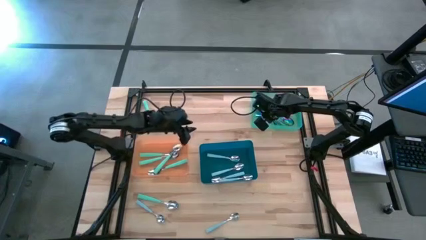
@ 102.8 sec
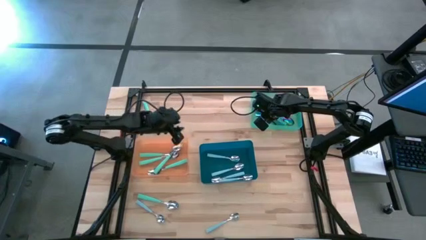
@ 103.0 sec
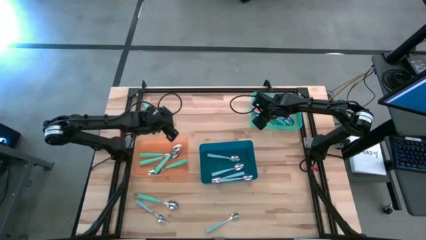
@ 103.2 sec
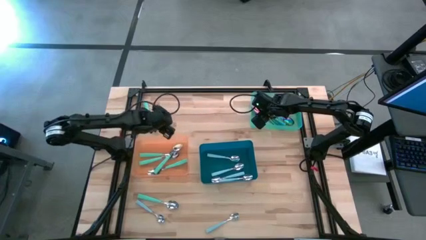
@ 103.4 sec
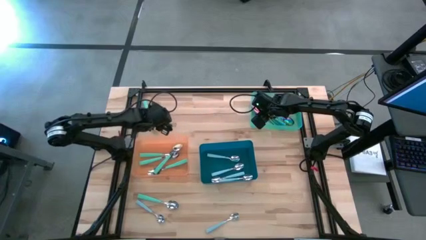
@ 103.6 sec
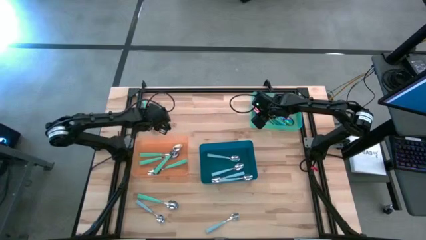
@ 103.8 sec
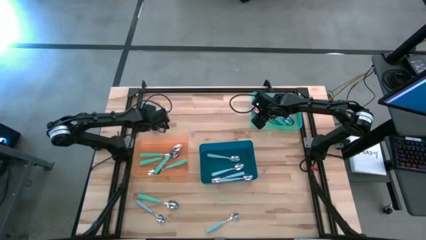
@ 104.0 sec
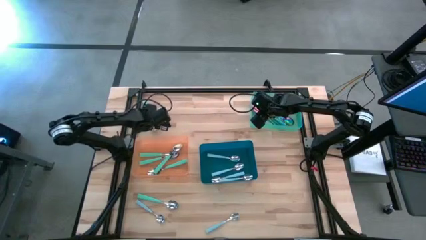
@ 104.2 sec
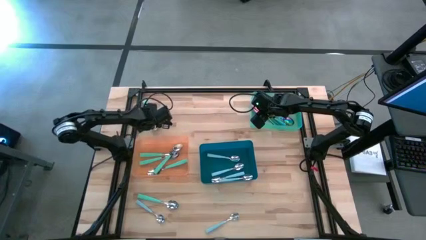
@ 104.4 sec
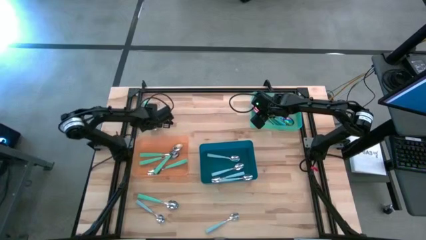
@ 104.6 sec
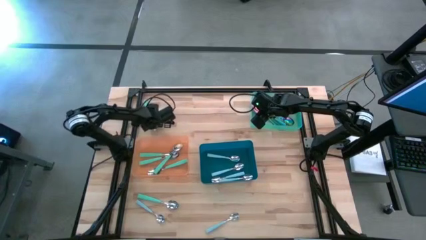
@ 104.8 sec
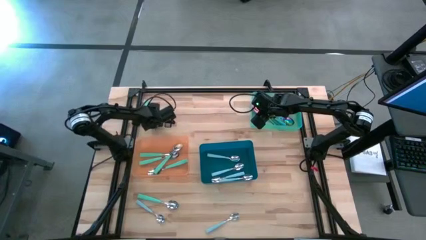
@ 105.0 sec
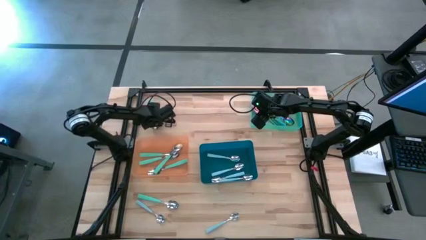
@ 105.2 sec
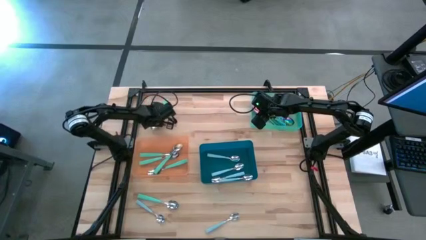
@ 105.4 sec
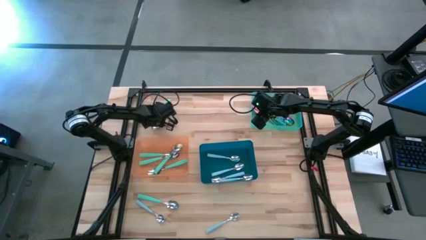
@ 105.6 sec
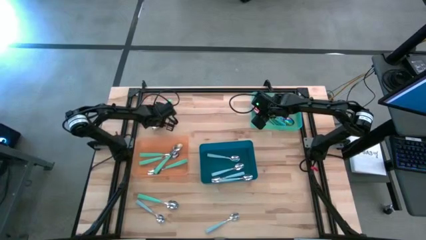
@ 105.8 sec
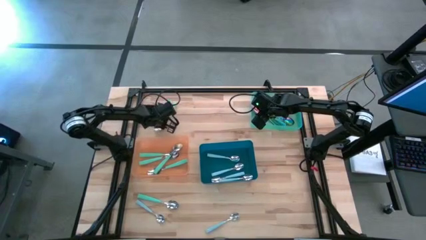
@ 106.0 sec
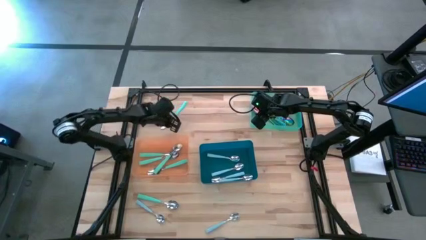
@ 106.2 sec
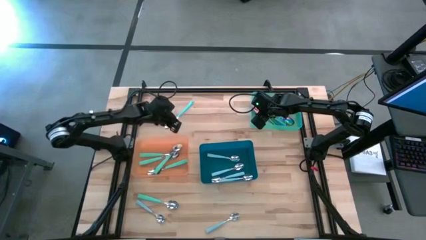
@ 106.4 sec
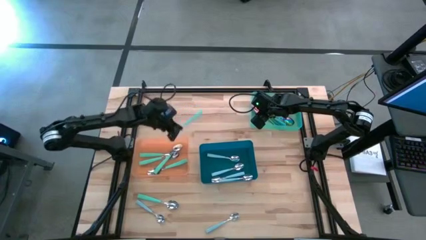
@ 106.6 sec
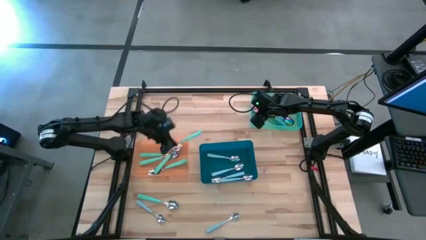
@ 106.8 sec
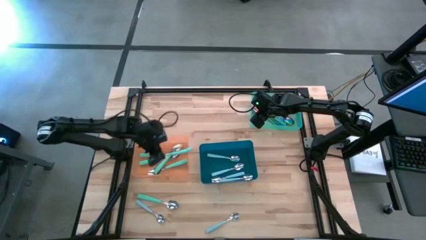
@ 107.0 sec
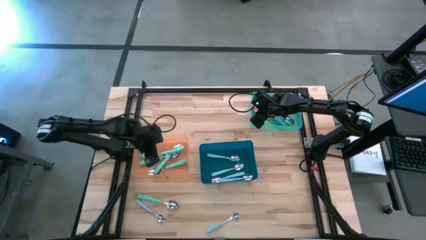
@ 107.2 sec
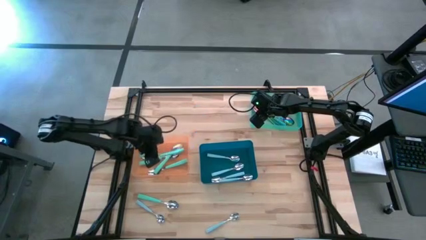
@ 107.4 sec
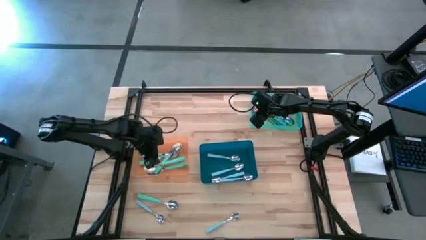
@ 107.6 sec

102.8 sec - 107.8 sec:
Task: Sort silverware by color (type)
Put the light green spoon into the orange bin

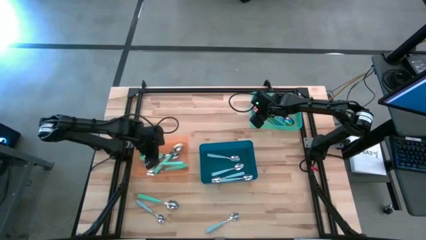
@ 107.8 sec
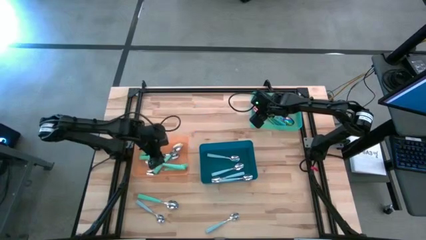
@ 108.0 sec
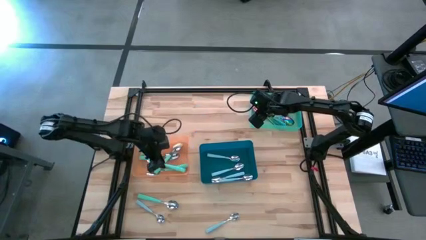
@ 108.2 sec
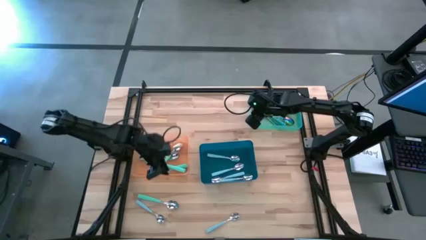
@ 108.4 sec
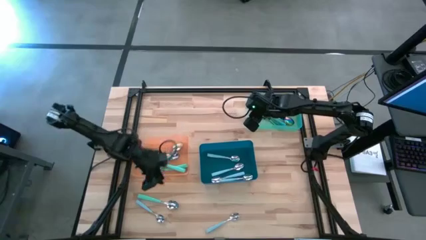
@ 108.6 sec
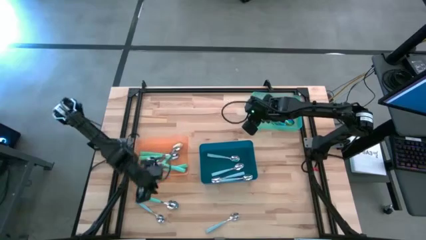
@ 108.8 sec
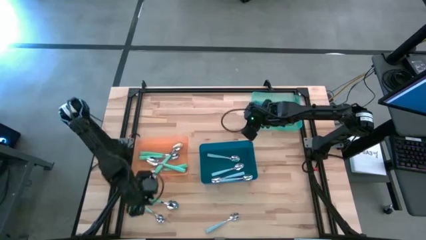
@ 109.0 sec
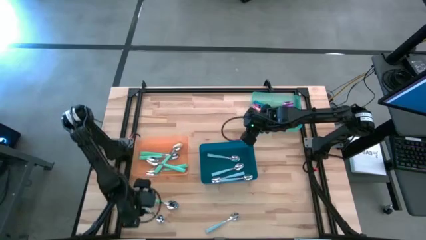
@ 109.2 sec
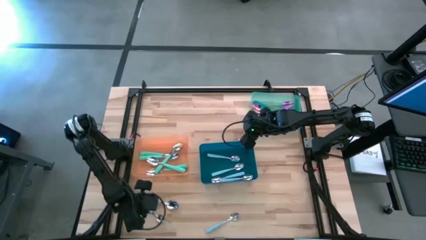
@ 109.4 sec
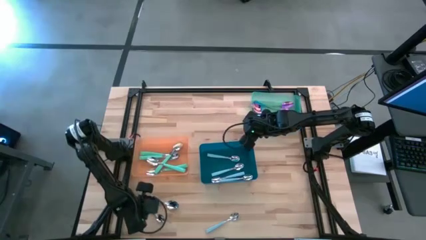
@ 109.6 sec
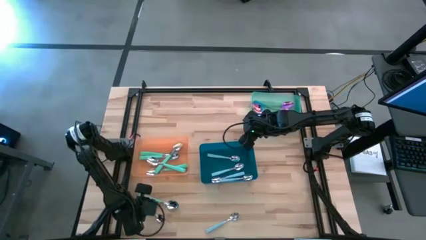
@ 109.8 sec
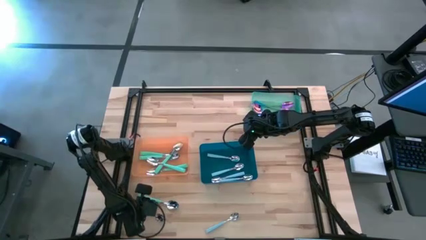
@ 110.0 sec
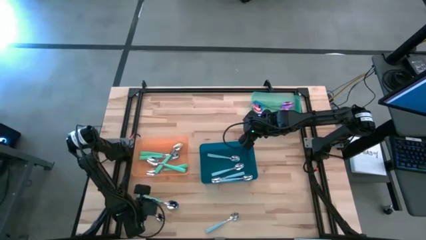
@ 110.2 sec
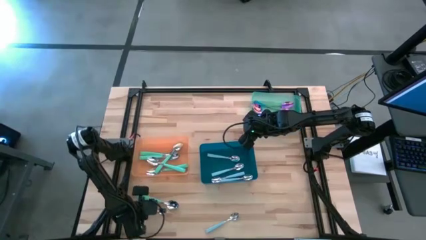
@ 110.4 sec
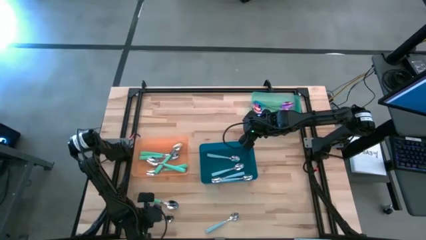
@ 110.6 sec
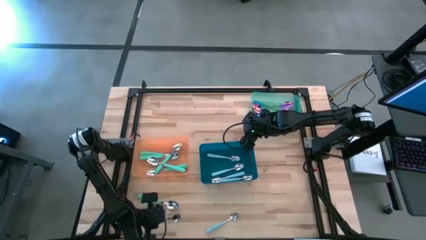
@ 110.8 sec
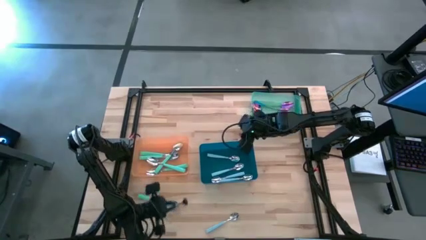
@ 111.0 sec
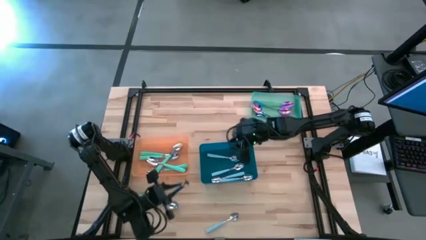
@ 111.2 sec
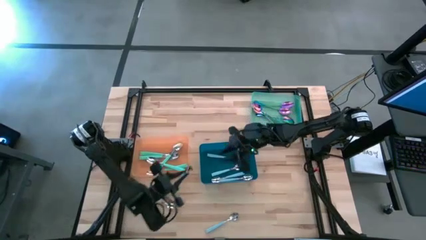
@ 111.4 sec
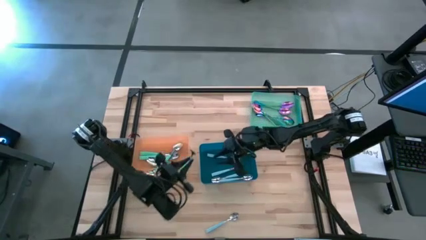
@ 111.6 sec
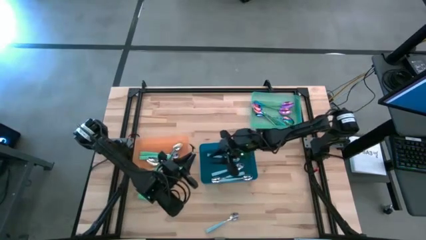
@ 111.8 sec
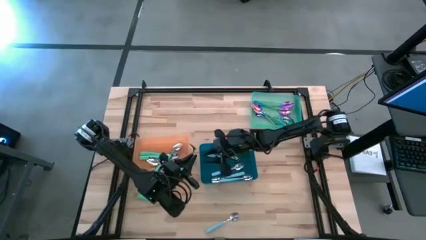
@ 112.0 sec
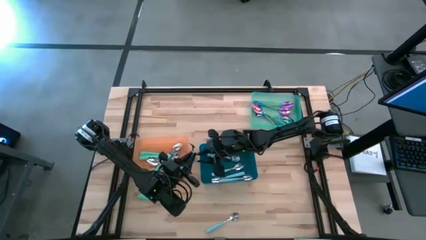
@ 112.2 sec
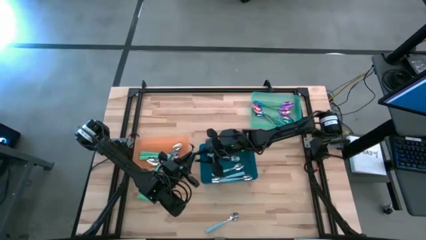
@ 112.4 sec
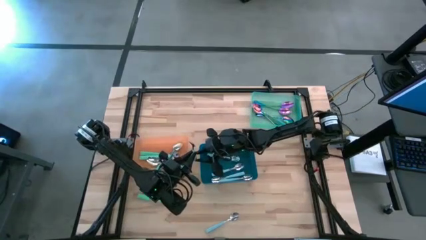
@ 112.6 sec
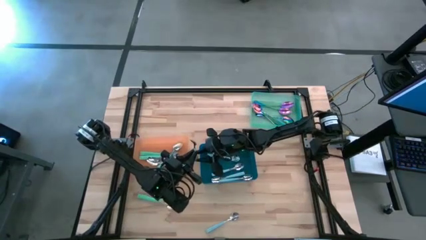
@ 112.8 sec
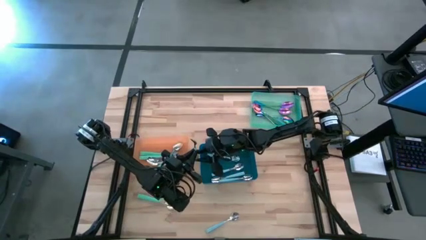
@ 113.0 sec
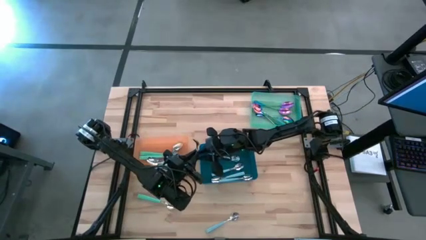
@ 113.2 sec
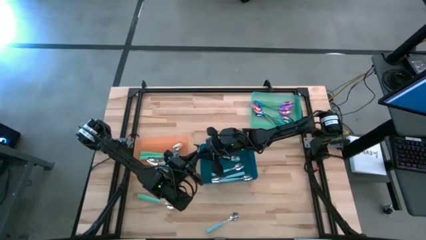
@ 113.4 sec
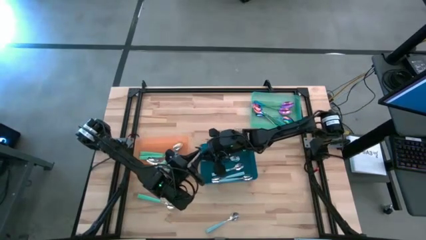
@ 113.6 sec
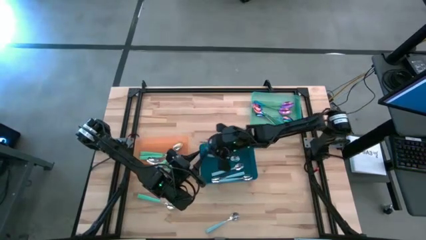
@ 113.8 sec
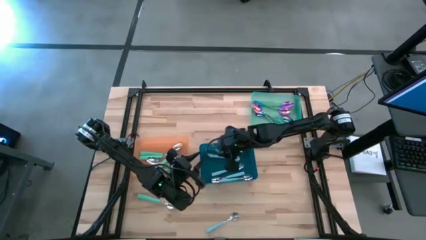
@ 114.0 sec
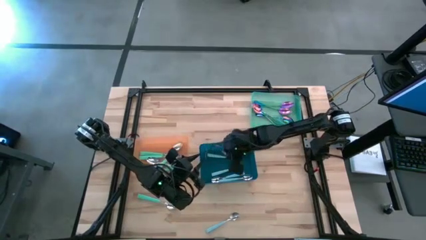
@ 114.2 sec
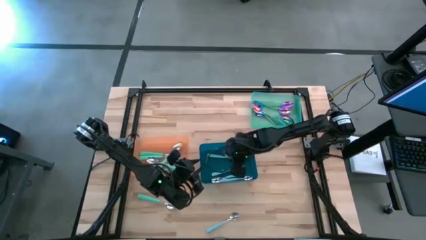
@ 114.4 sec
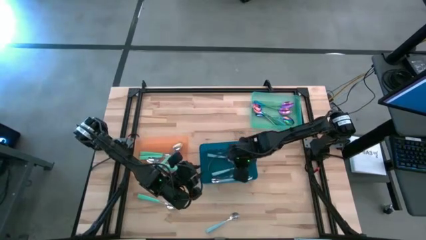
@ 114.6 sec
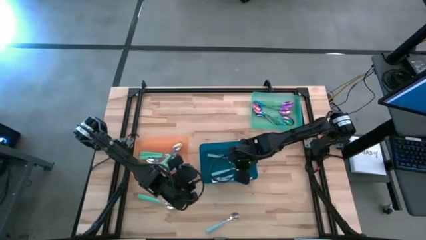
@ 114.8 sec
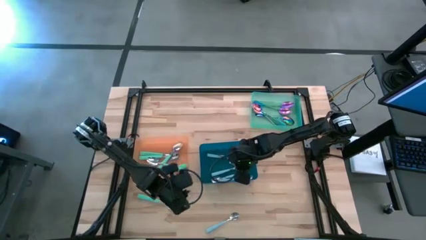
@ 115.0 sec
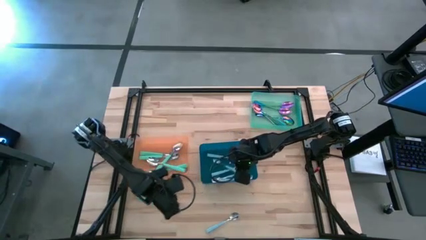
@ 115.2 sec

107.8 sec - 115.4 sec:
Put the light blue spoon into the blue bin

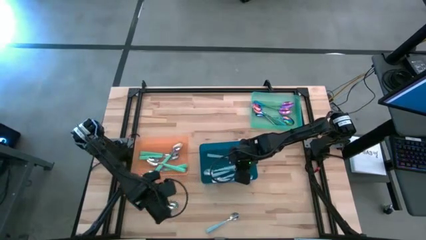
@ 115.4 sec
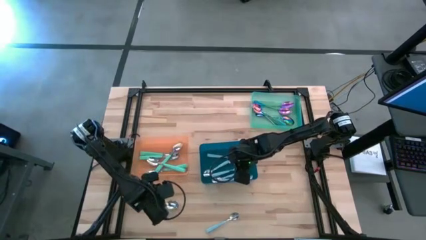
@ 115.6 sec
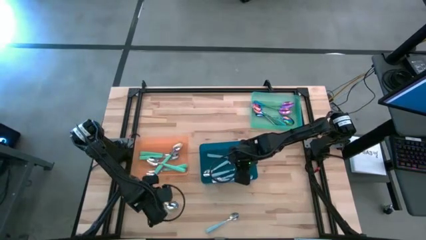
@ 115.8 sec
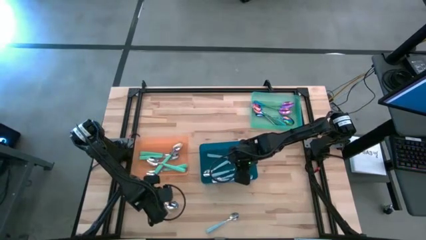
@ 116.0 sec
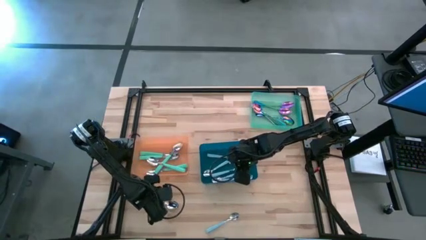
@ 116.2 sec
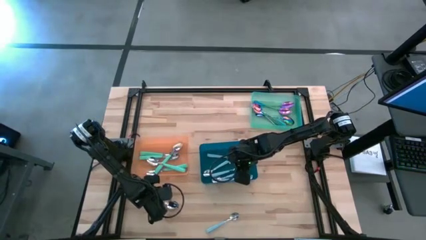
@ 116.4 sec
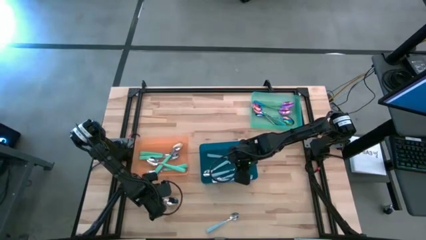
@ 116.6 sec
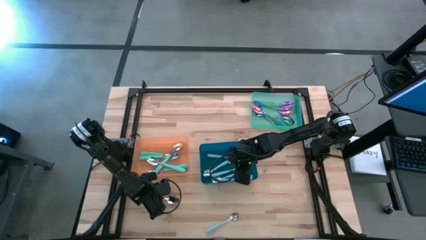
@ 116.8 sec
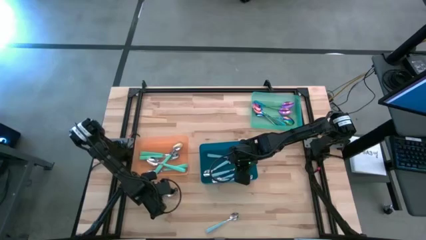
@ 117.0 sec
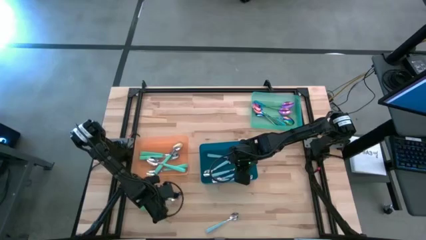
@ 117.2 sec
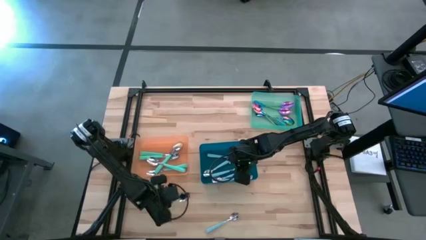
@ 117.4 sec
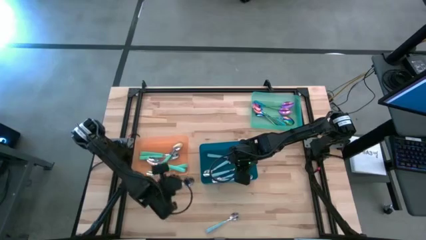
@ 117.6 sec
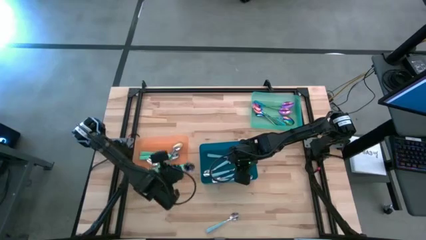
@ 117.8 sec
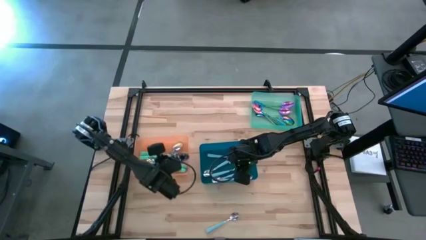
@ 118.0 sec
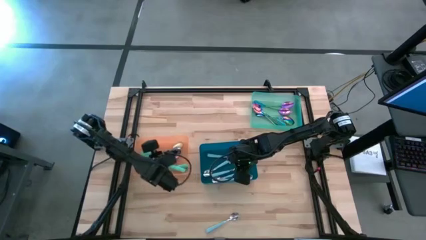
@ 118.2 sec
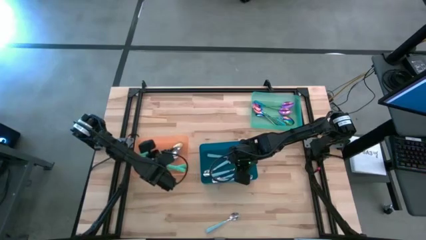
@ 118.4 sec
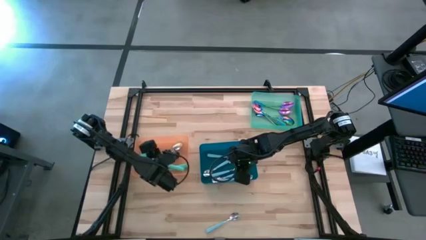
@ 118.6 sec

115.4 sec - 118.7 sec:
Put the light green spoon into the orange bin
